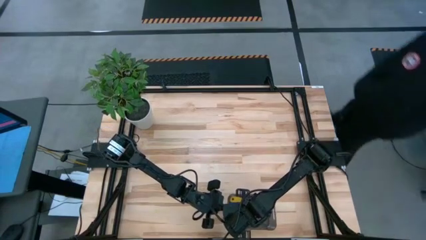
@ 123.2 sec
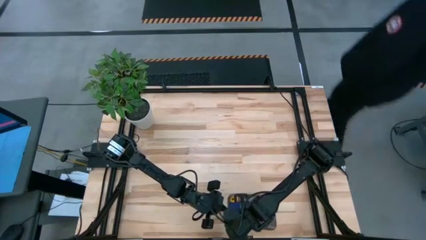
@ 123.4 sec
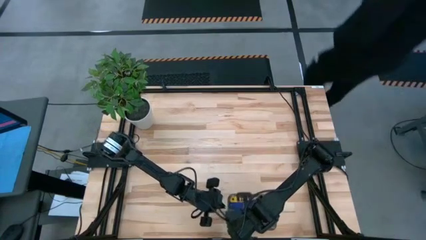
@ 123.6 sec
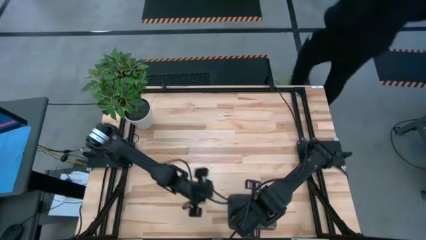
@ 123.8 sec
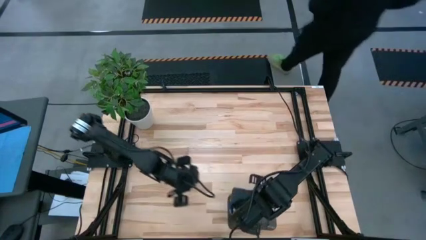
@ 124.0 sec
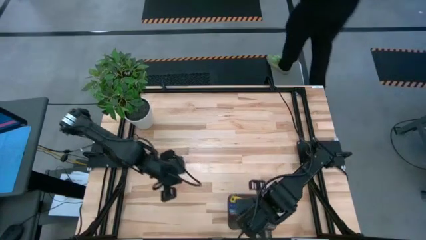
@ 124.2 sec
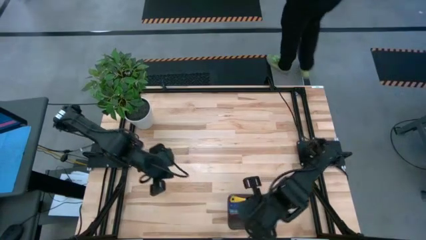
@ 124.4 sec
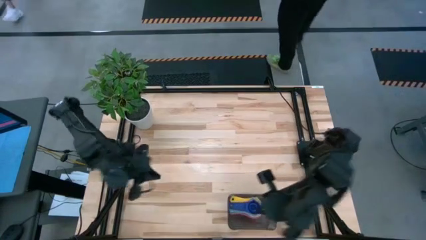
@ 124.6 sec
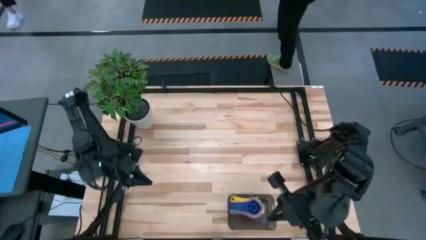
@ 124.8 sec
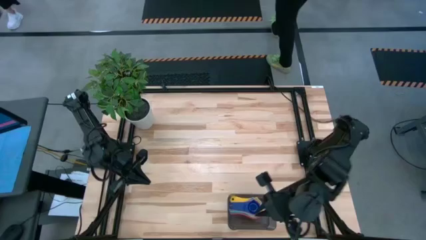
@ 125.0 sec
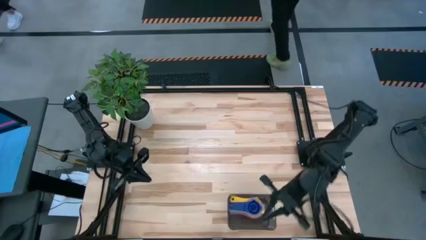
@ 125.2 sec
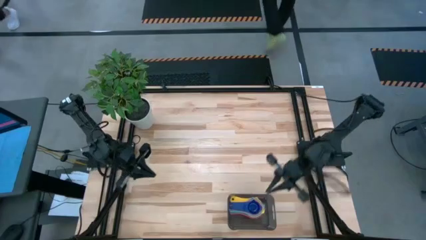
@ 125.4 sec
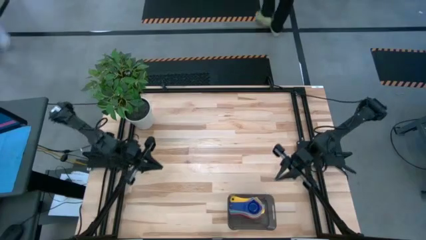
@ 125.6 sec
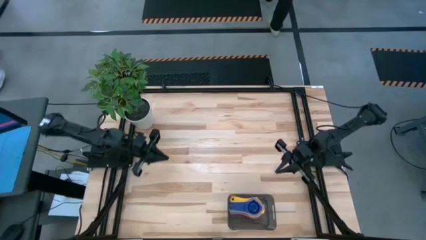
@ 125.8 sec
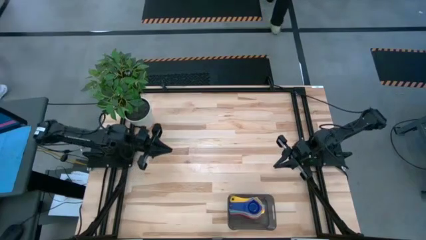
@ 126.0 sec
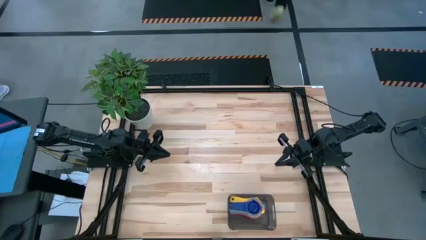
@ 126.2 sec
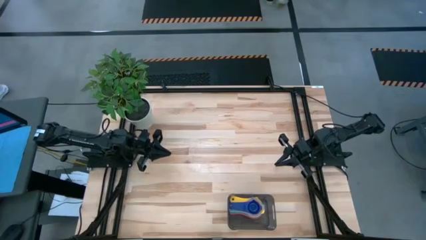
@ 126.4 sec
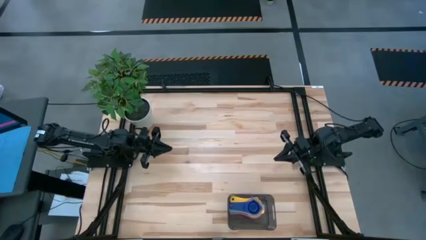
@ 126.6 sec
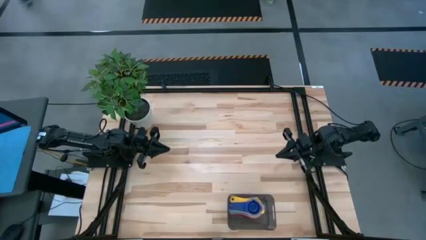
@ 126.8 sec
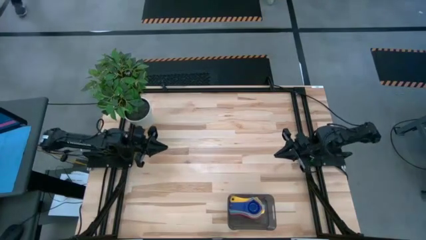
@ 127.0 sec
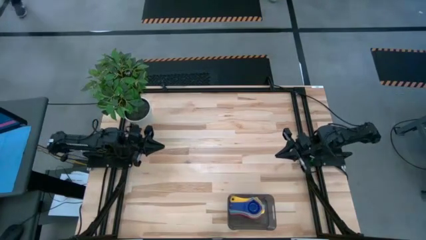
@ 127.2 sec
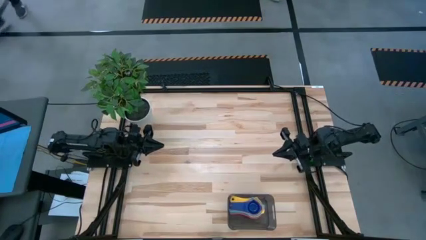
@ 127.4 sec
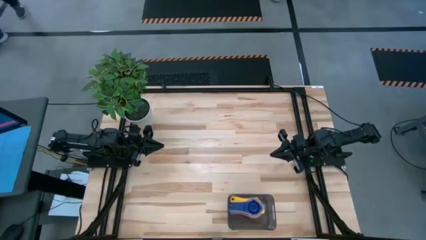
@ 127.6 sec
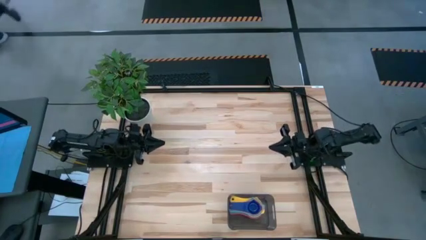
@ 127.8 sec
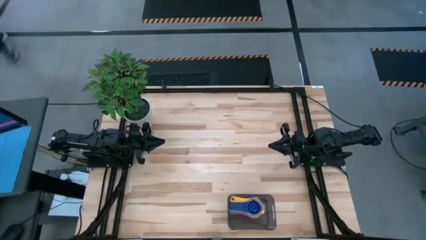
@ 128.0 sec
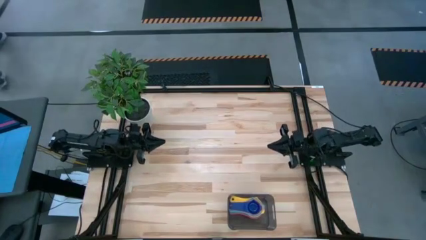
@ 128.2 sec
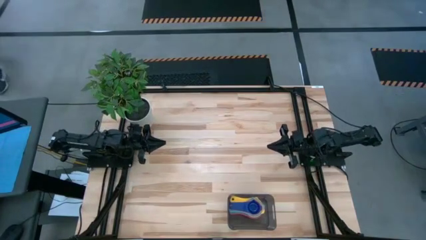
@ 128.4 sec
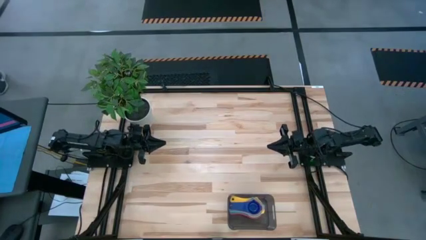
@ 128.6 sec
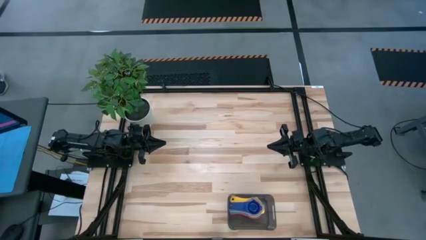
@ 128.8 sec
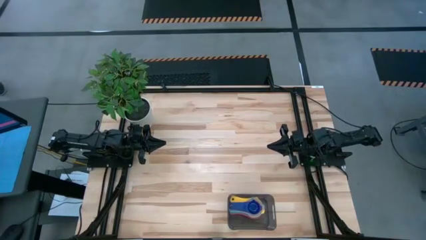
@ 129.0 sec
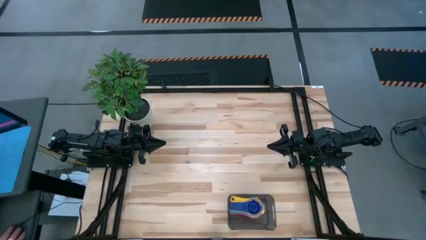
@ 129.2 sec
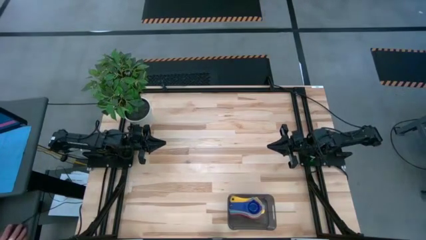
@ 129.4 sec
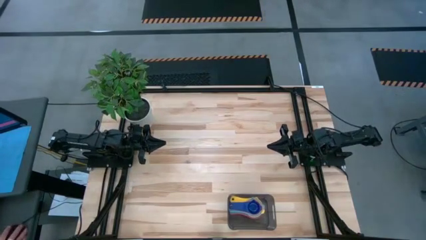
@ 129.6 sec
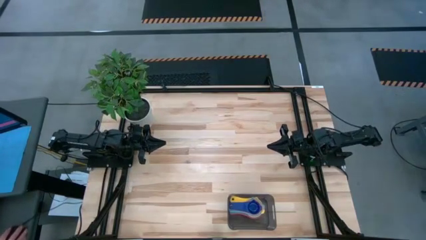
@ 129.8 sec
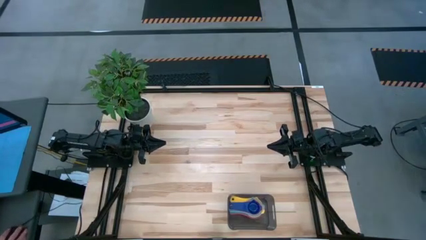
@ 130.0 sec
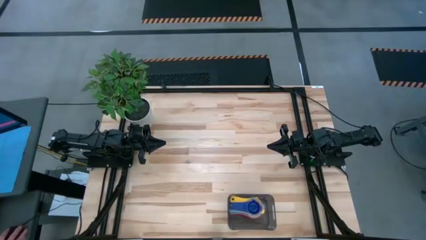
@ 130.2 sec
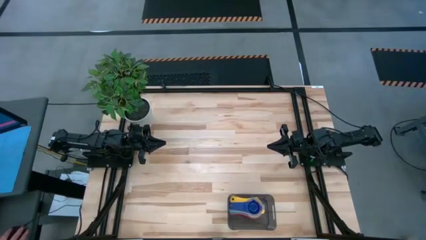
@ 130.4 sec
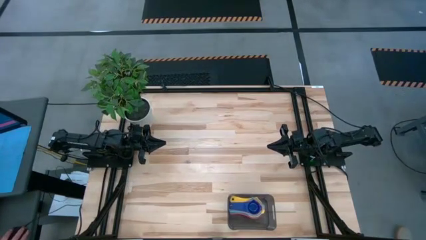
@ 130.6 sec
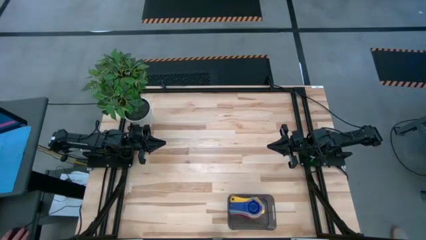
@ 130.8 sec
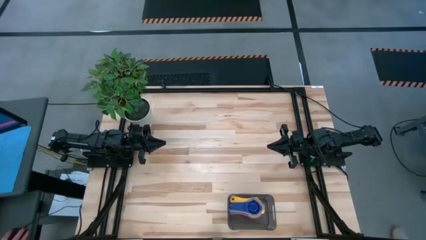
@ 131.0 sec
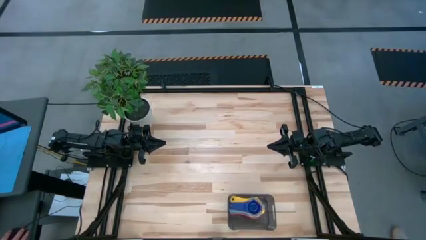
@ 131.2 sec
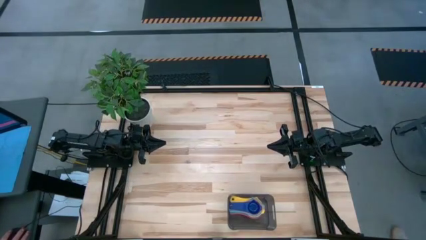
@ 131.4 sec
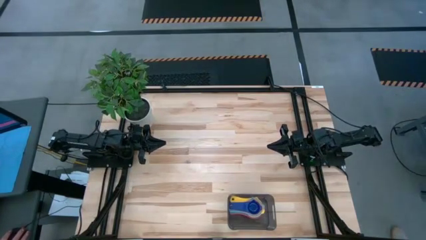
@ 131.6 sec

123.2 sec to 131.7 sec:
Task: Nest measuring cups in basket
Return to Home Position

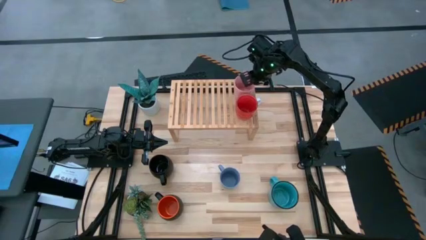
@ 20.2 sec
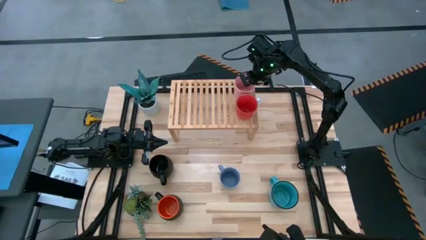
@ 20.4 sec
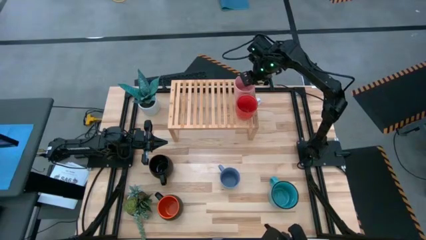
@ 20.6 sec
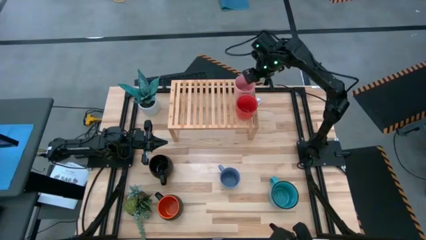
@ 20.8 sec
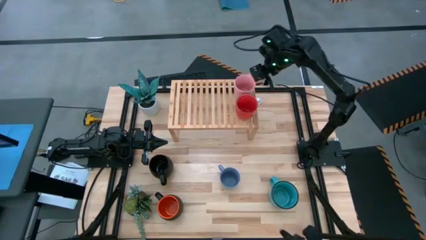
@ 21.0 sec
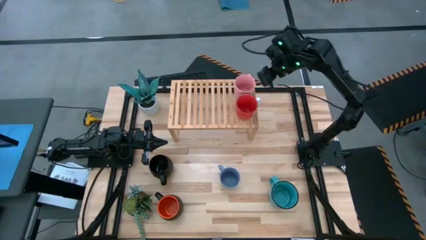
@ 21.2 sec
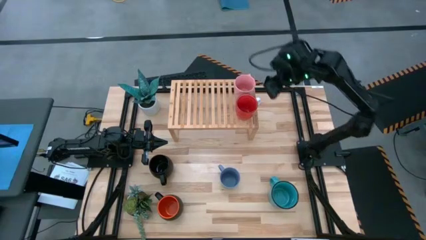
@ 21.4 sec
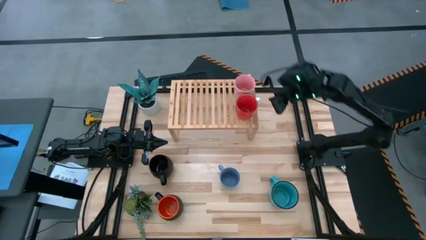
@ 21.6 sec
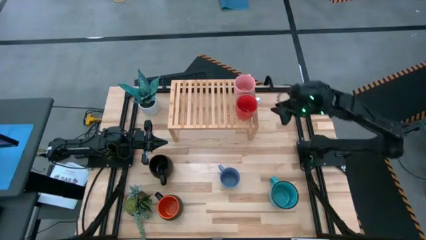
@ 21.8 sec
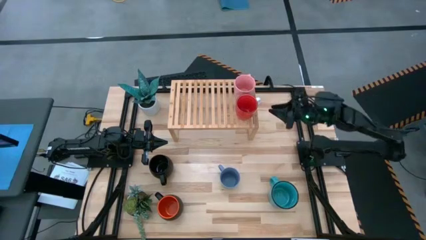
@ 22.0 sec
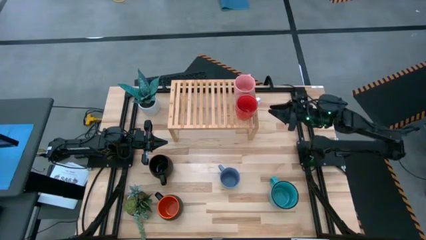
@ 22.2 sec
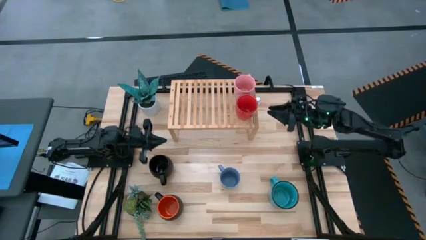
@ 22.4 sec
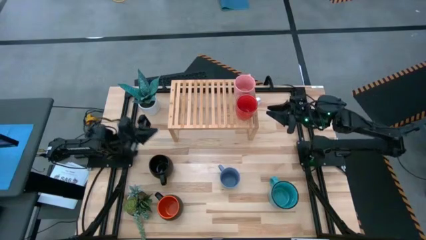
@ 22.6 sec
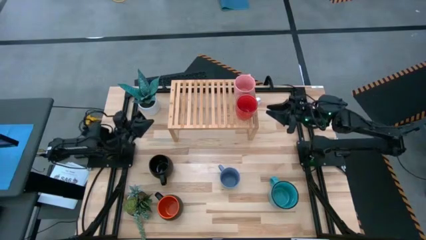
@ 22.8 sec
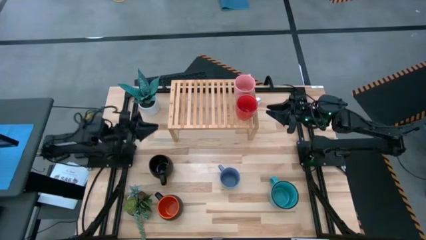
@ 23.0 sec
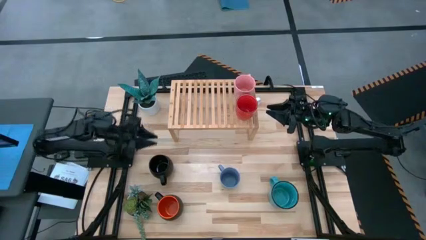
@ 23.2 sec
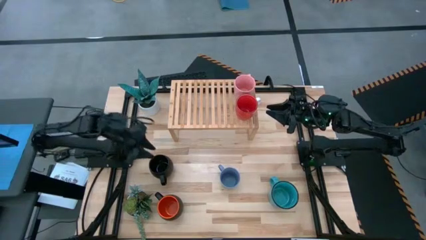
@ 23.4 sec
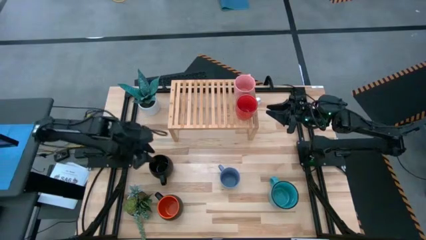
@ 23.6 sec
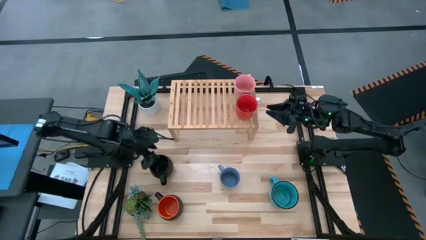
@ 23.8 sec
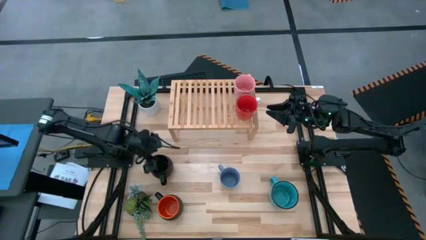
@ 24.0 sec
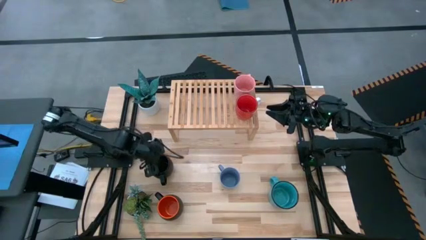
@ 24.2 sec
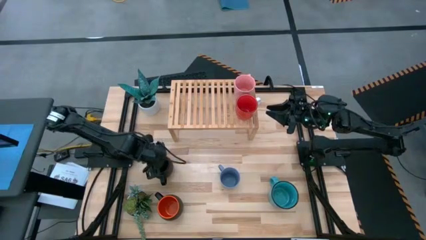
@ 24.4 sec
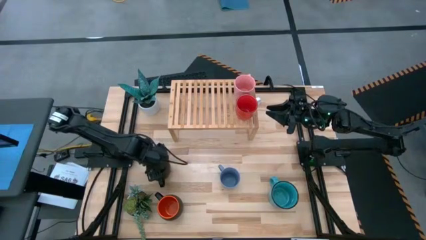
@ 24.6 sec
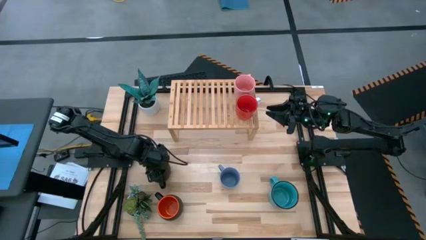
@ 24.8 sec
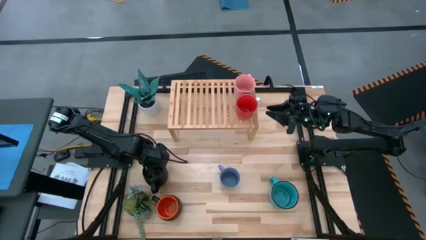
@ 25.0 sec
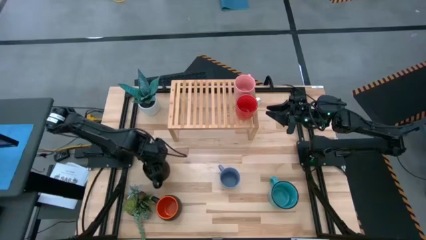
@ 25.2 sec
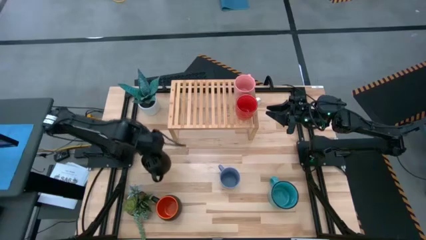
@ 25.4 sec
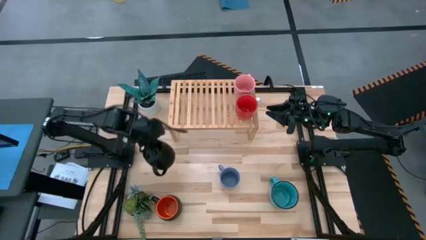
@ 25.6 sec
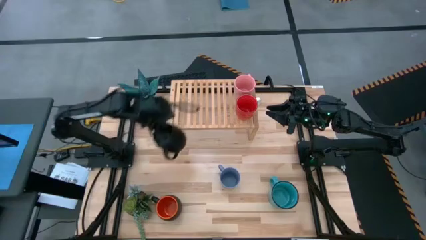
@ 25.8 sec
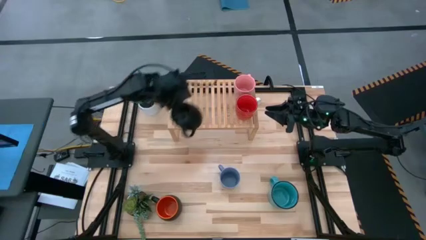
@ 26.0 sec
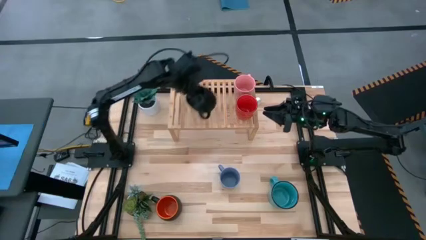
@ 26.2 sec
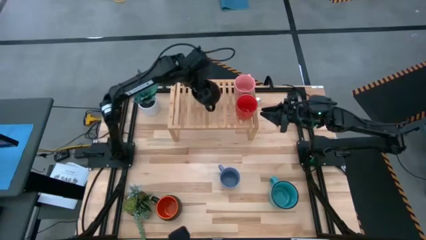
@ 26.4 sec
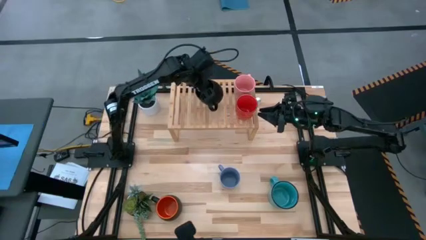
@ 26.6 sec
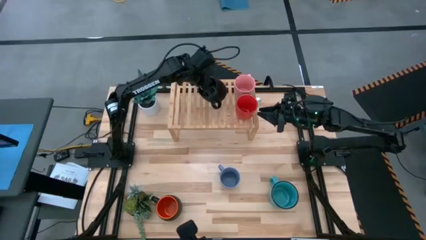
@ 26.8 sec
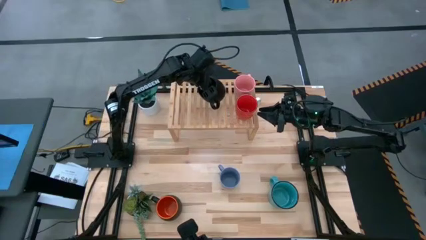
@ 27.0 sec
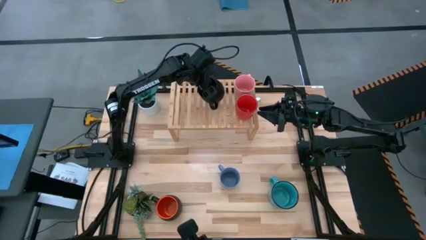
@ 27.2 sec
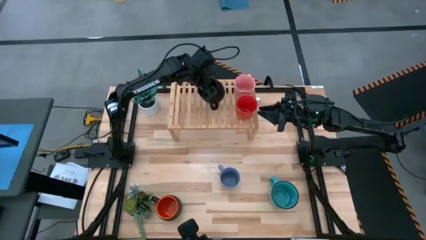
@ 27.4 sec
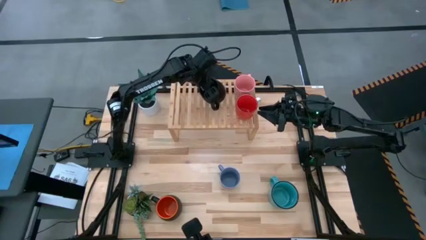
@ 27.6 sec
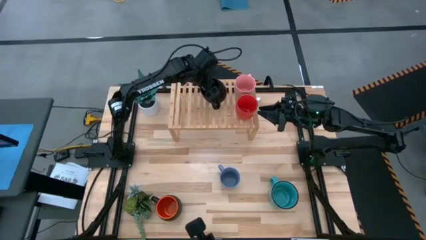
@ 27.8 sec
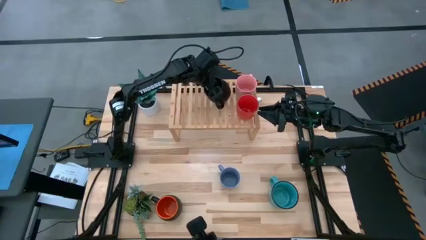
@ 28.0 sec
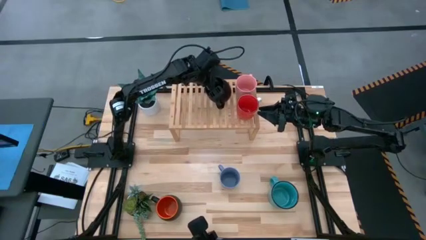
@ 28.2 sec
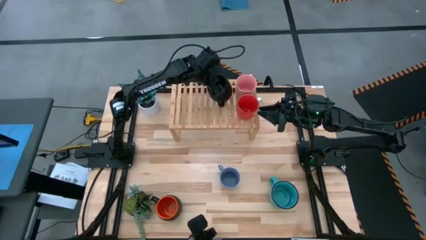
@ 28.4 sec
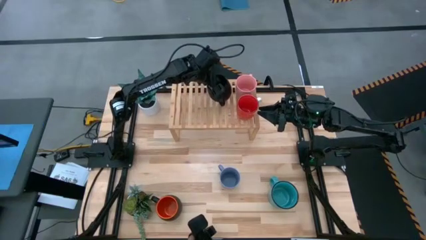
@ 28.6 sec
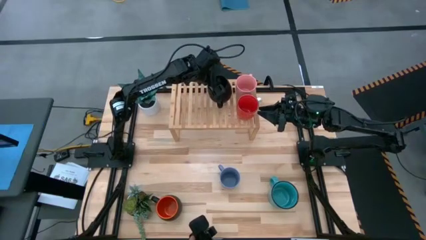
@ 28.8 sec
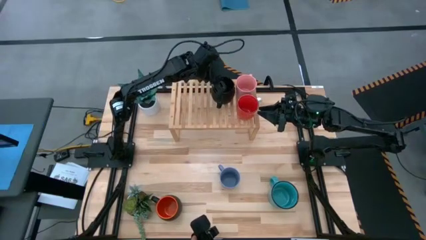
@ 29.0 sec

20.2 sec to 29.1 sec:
Task: Place coffee mugs
Put the black mug on the shelf
